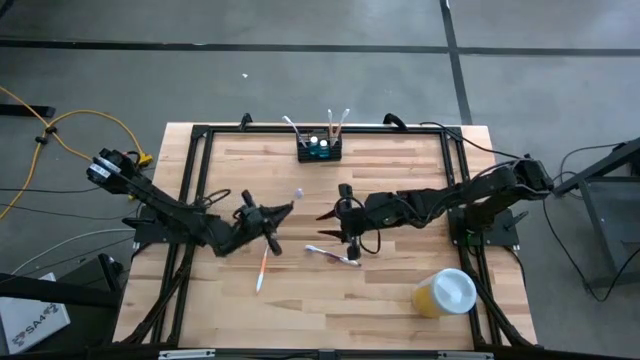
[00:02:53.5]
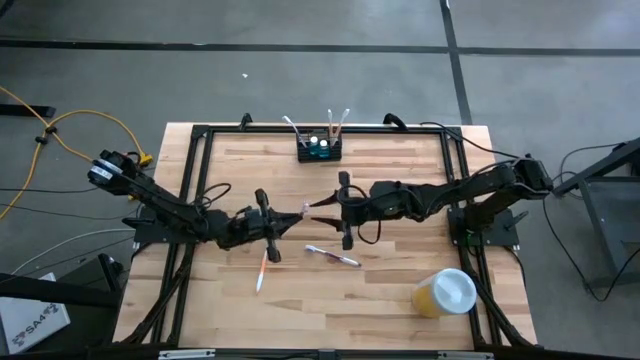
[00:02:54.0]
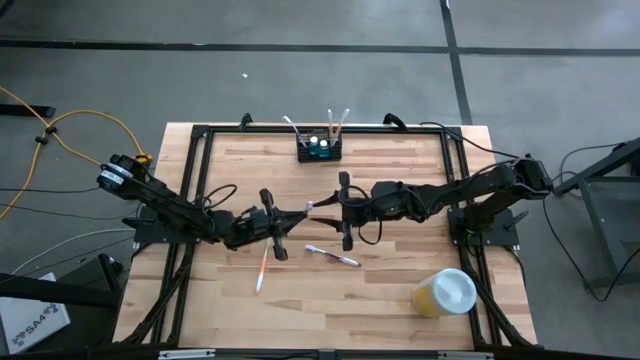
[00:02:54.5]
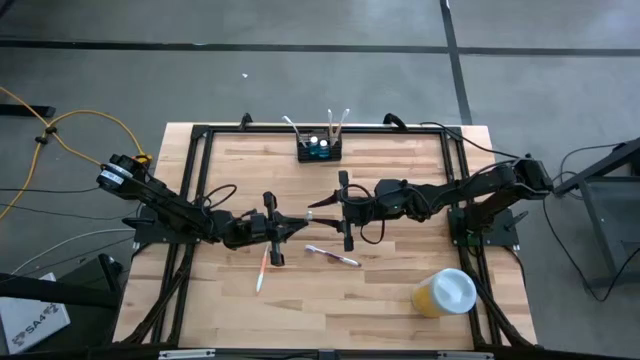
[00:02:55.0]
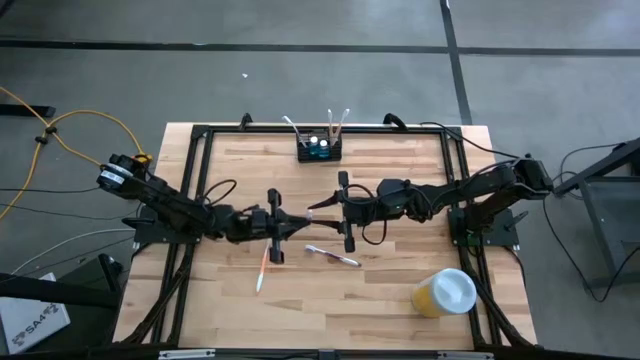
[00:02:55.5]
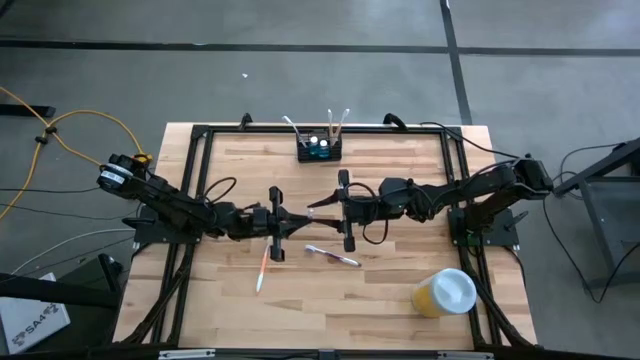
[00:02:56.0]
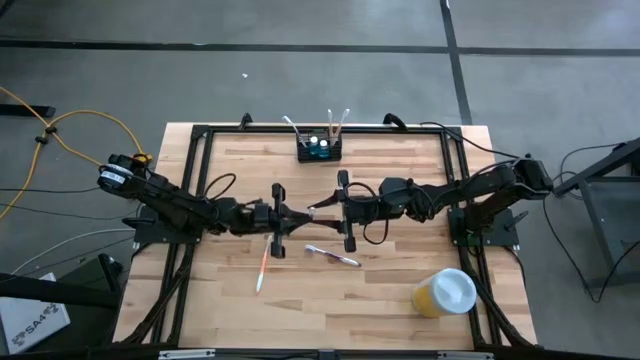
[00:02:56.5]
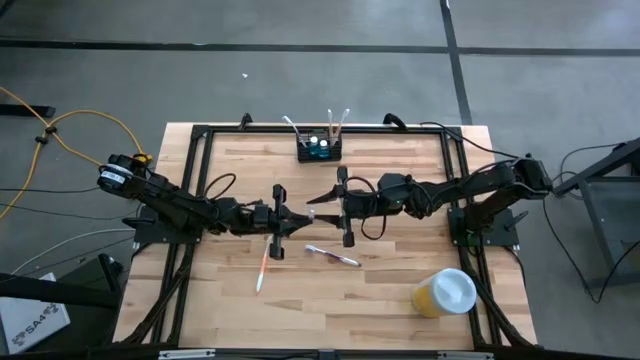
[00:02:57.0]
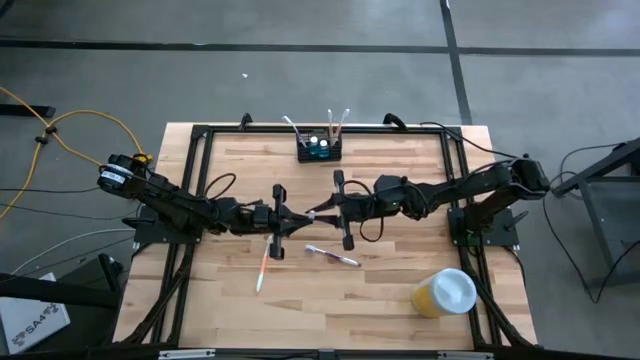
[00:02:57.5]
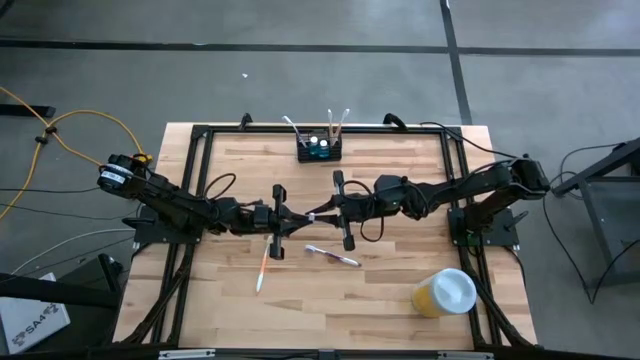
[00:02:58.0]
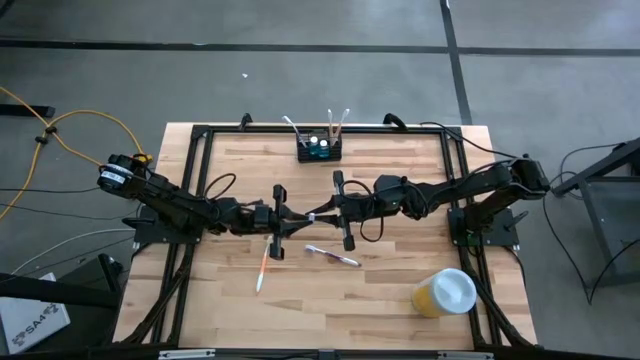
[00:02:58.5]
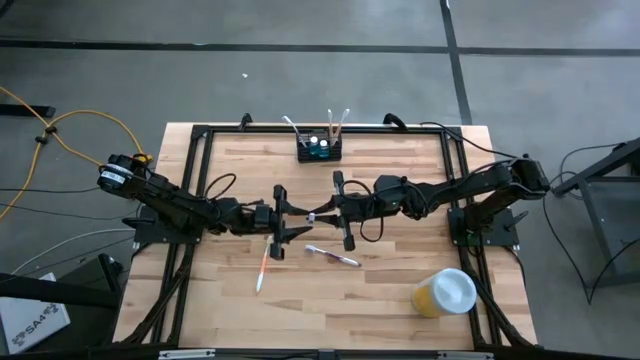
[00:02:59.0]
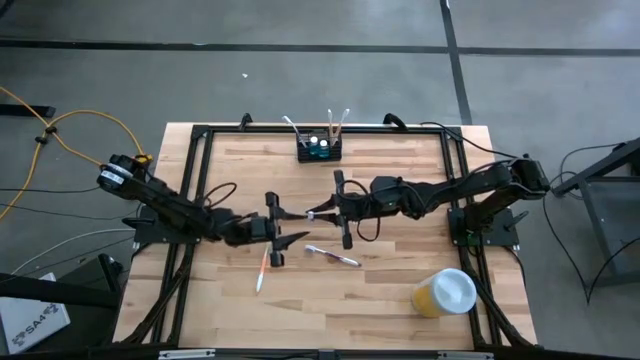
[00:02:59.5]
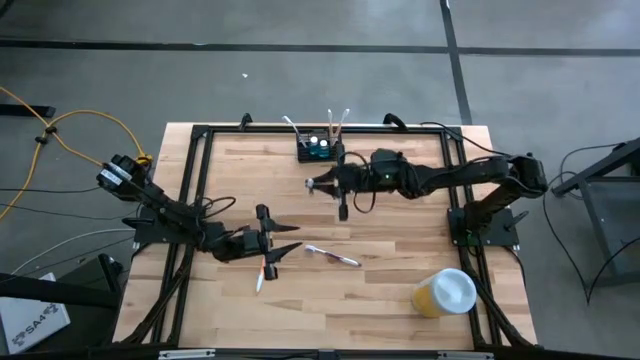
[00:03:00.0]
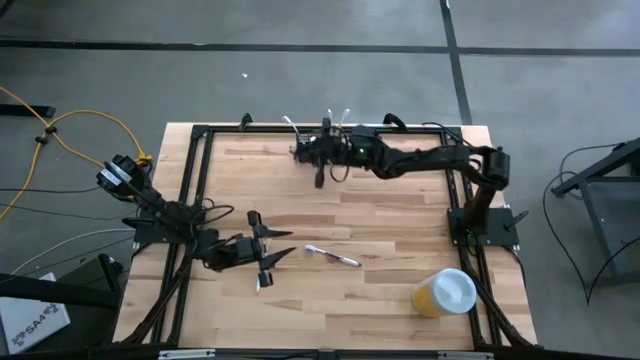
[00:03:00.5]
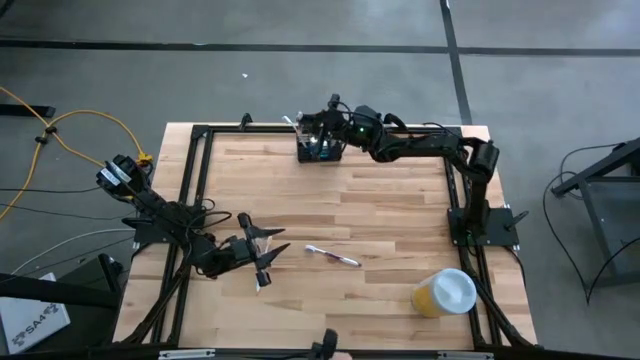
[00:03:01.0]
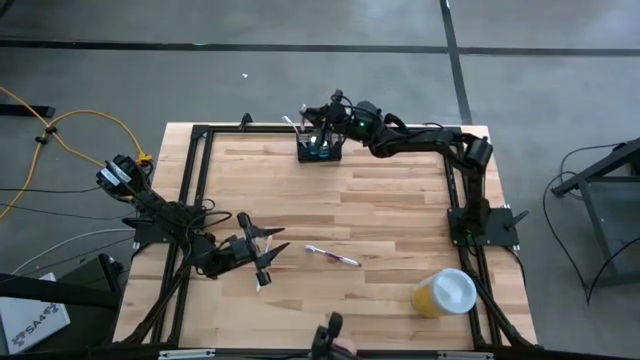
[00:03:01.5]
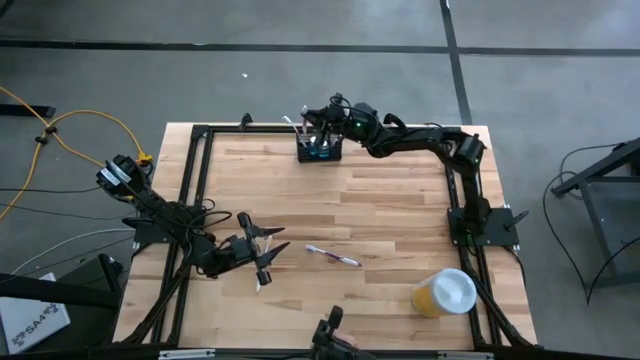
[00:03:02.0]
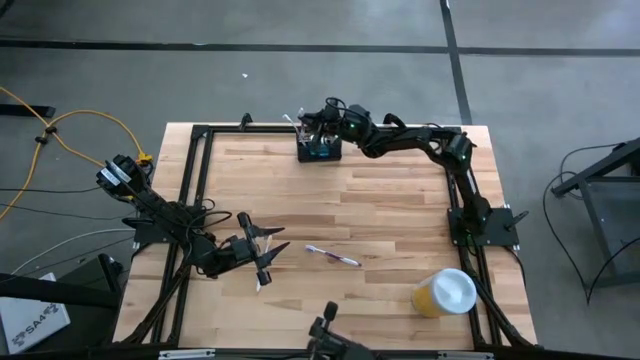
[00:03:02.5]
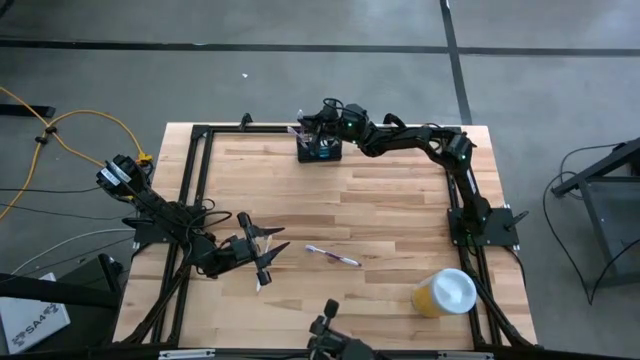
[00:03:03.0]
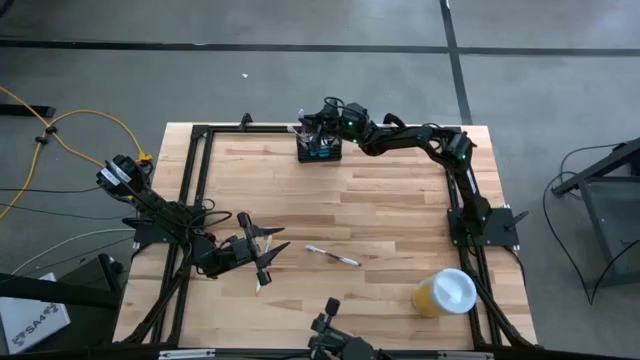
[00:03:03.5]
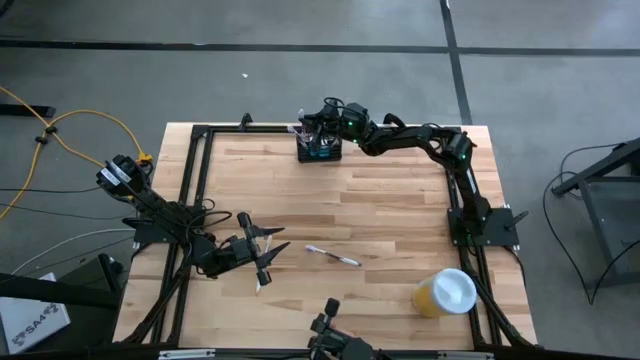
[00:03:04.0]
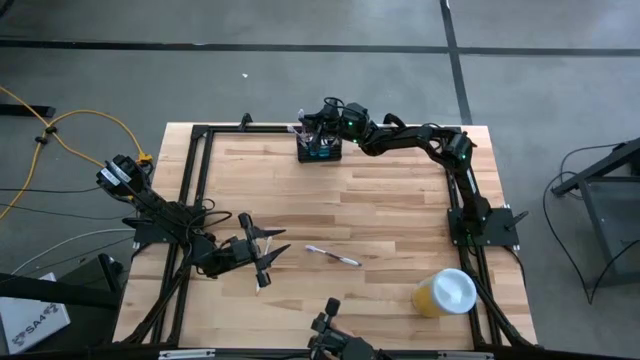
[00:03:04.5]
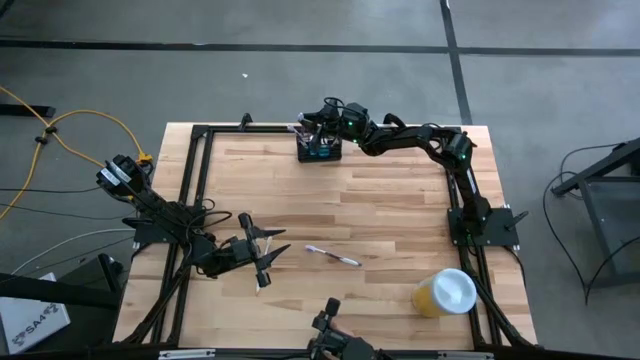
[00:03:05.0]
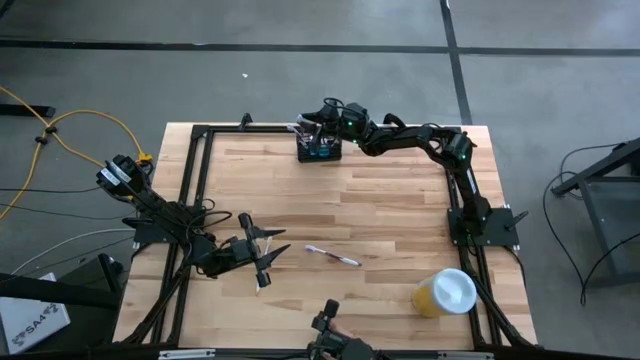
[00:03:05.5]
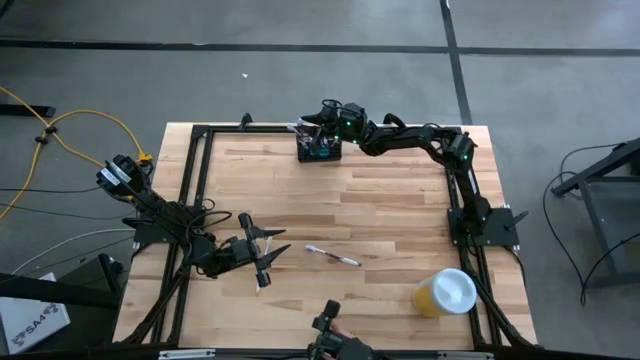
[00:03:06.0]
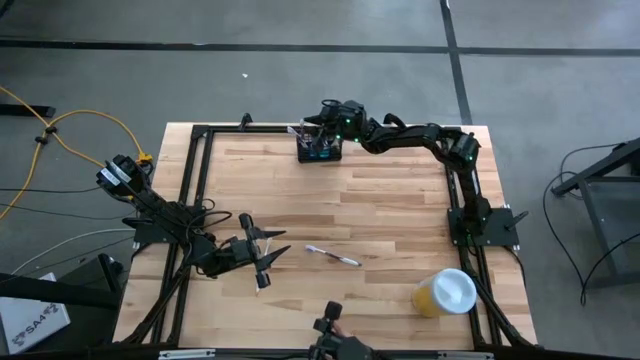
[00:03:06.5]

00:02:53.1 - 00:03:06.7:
Task: Pick & Place toothbrushing station
Put the left purple toothbrush into the wire organizer

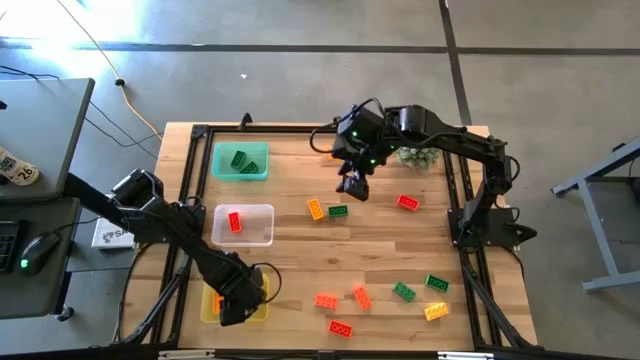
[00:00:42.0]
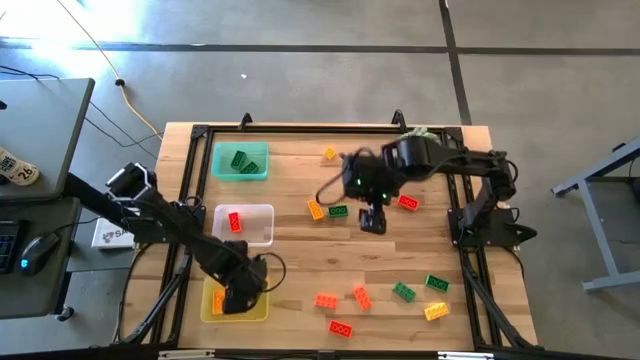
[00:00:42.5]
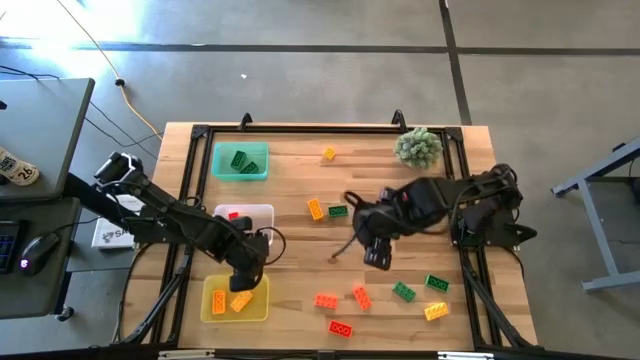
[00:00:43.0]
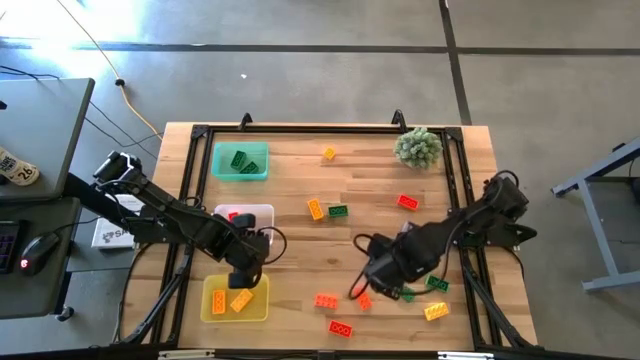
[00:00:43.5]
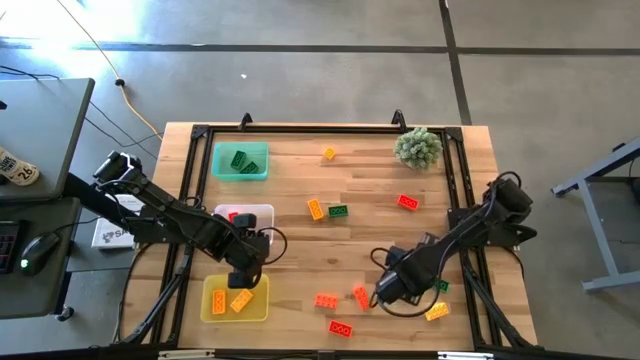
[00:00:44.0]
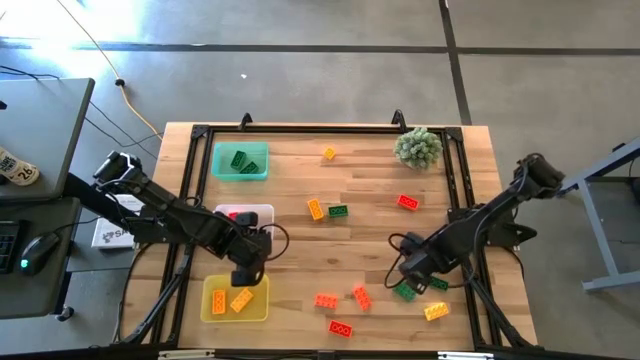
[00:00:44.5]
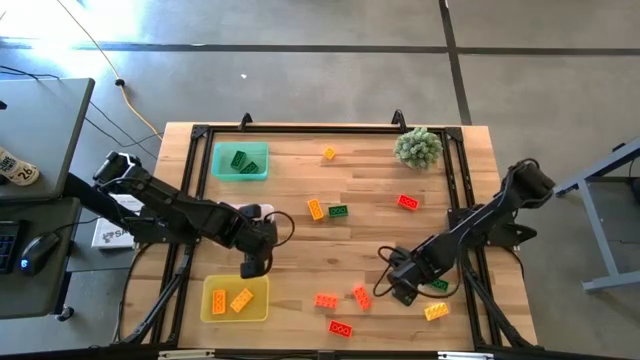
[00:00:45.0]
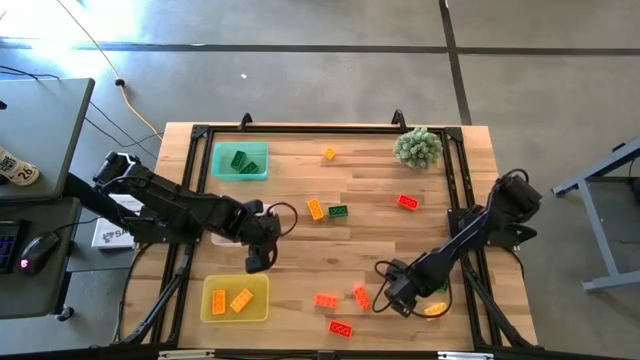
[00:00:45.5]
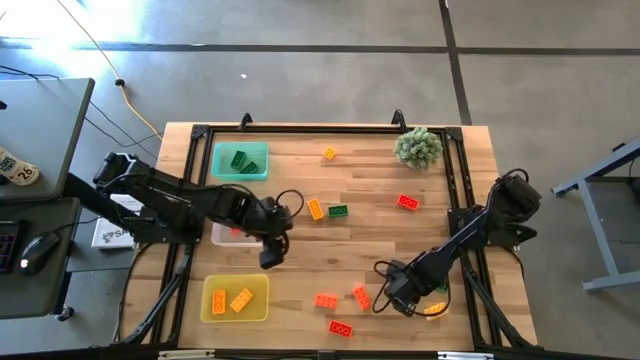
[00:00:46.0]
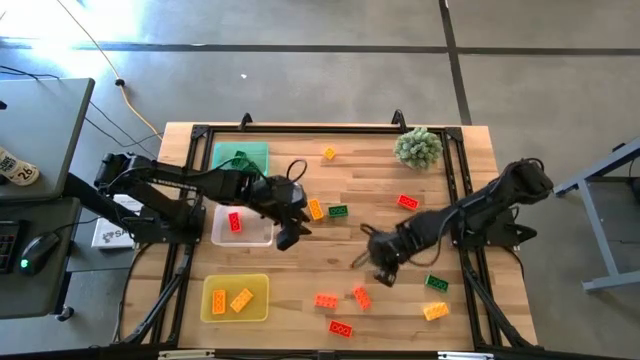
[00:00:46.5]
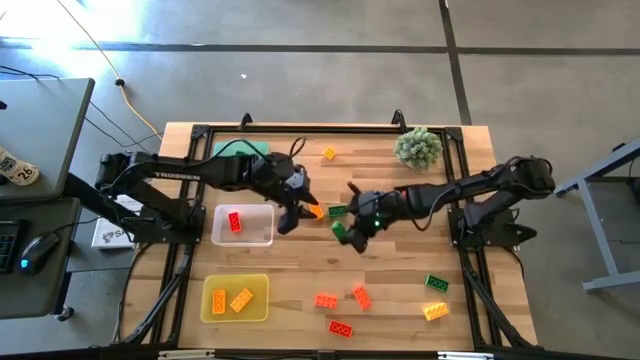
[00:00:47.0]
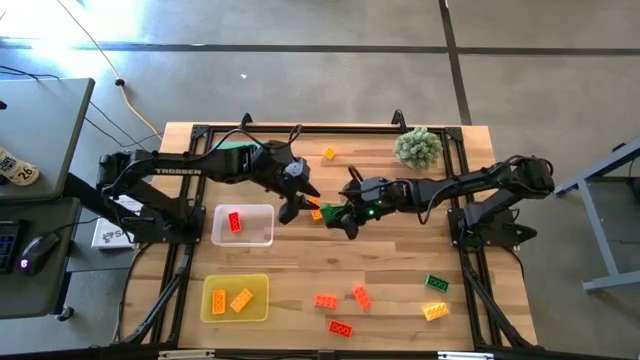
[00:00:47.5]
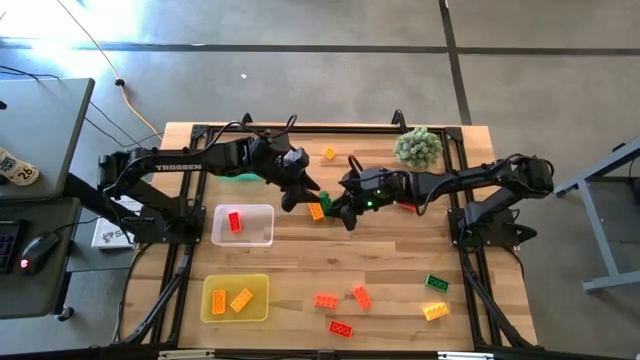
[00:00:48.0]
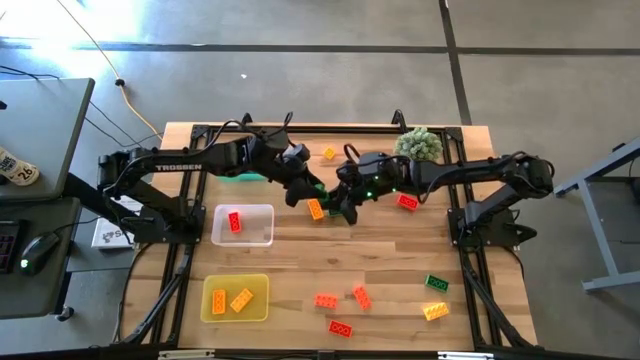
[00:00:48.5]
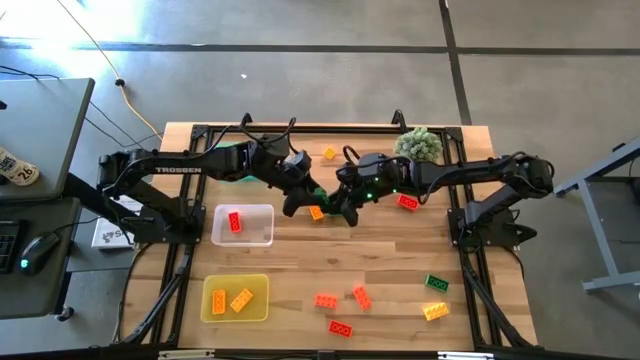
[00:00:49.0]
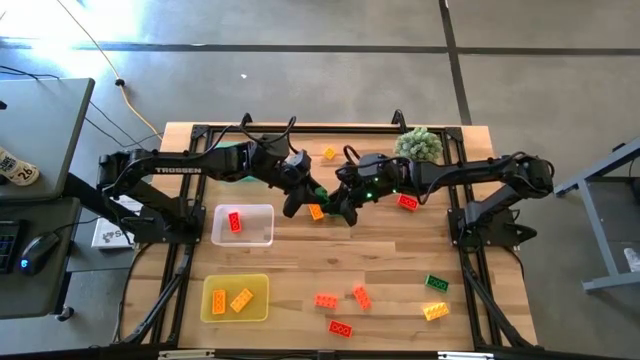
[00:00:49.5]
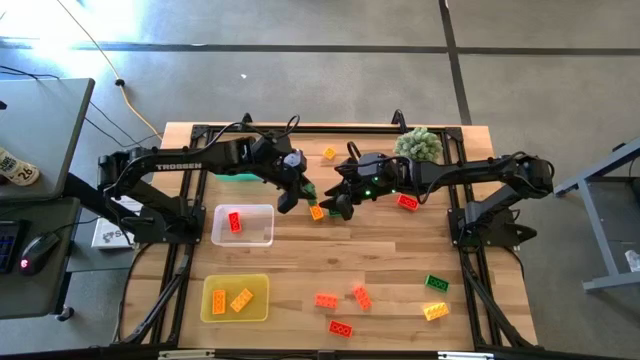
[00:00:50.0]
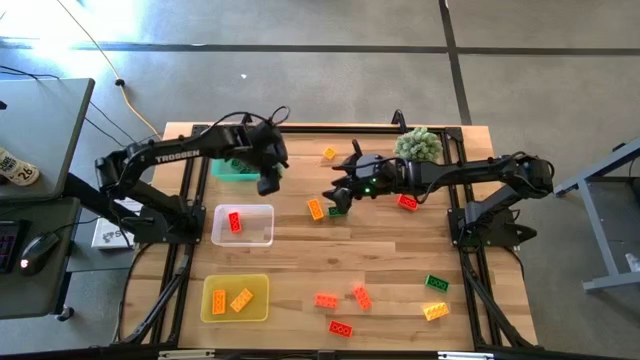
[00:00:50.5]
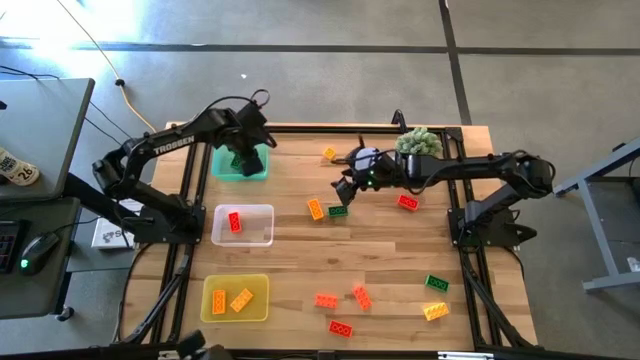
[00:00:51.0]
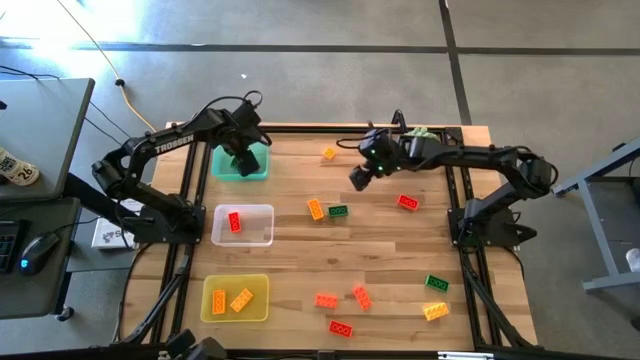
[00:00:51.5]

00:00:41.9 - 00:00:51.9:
Task: Sort & place blocks by color
Put the green game piece into the green bin
